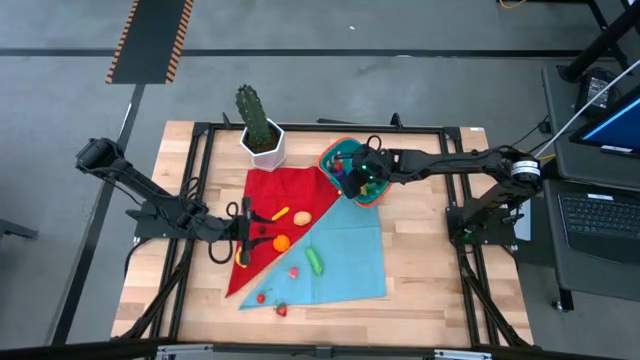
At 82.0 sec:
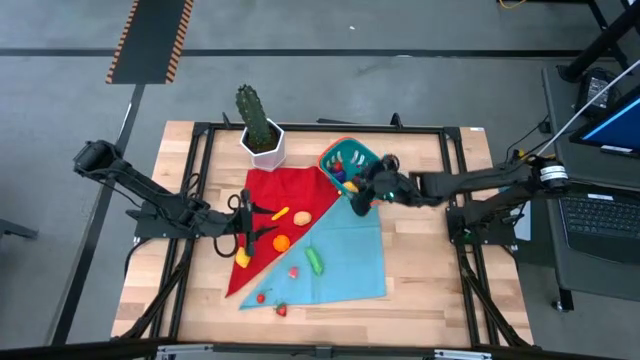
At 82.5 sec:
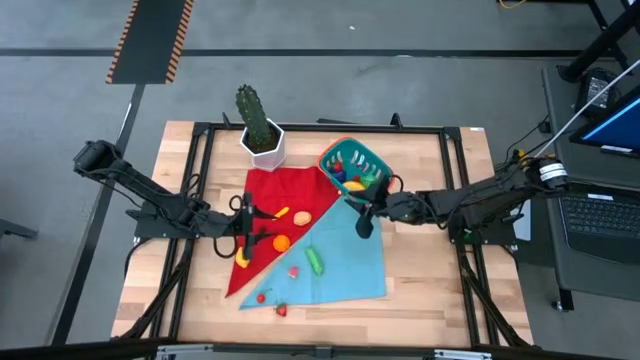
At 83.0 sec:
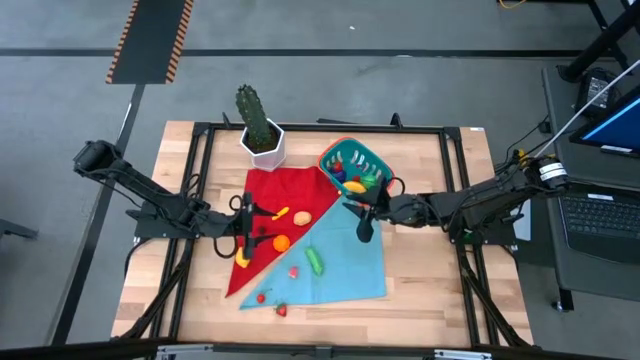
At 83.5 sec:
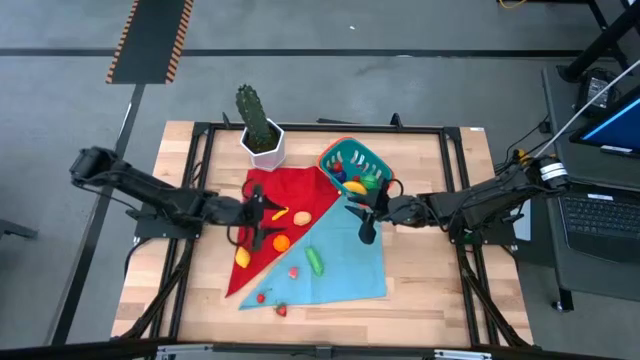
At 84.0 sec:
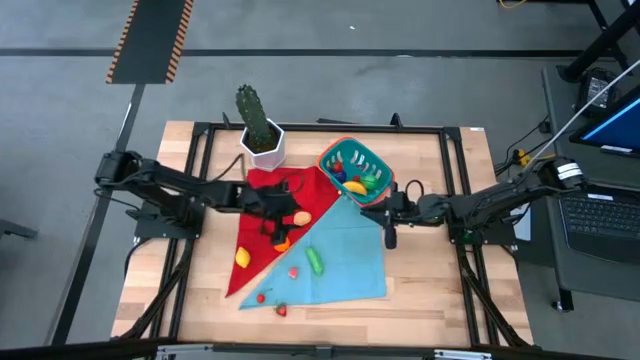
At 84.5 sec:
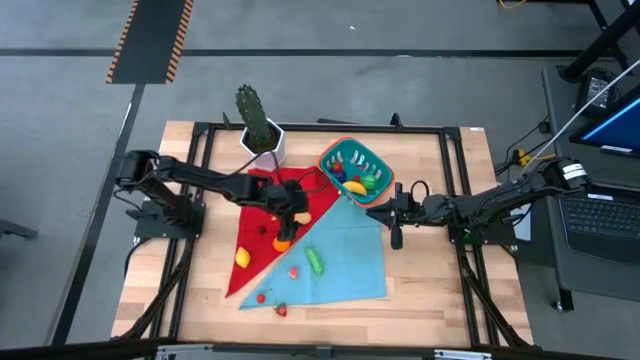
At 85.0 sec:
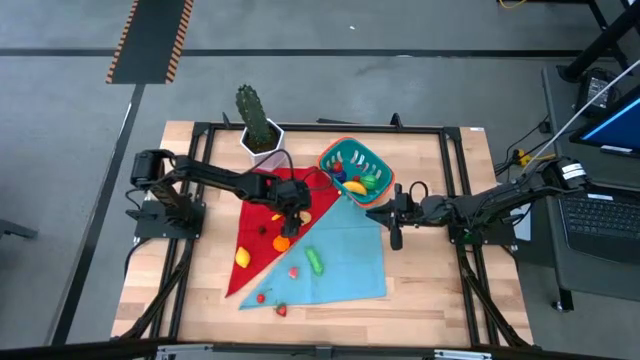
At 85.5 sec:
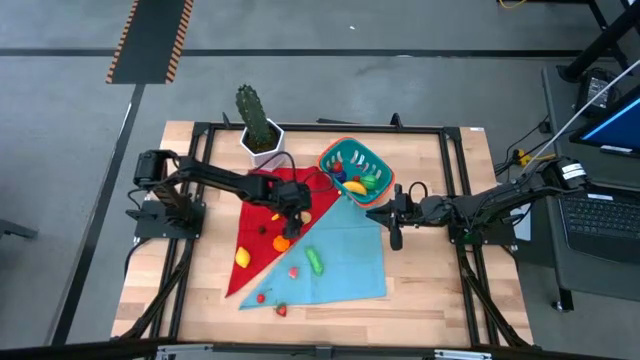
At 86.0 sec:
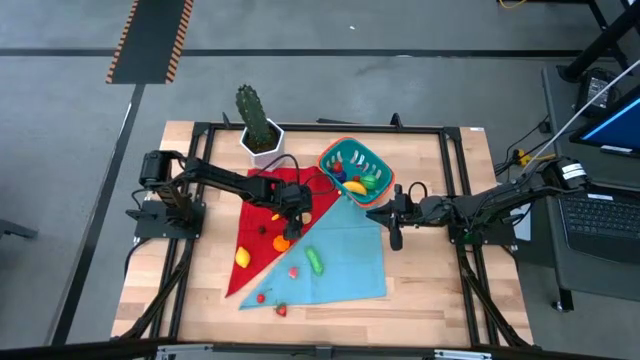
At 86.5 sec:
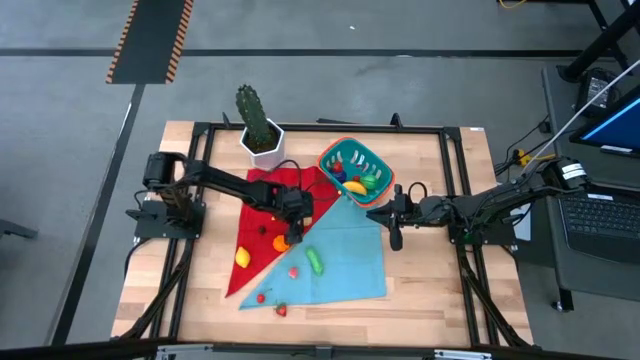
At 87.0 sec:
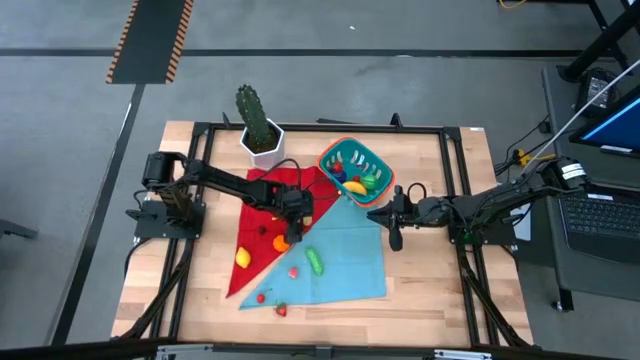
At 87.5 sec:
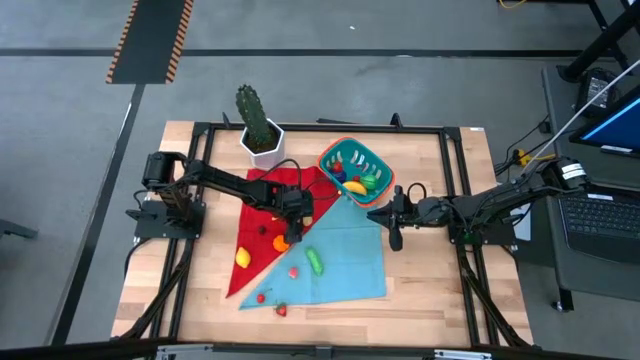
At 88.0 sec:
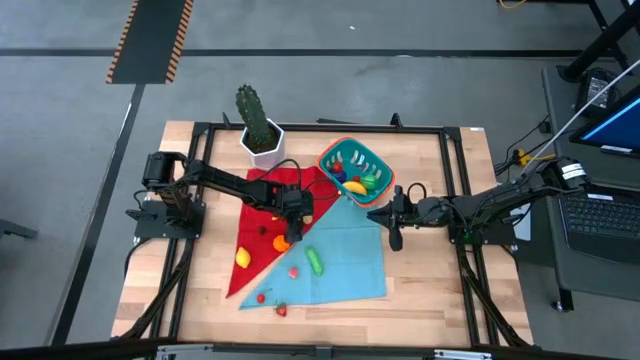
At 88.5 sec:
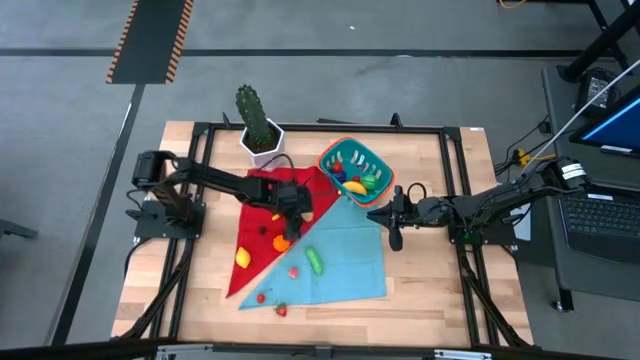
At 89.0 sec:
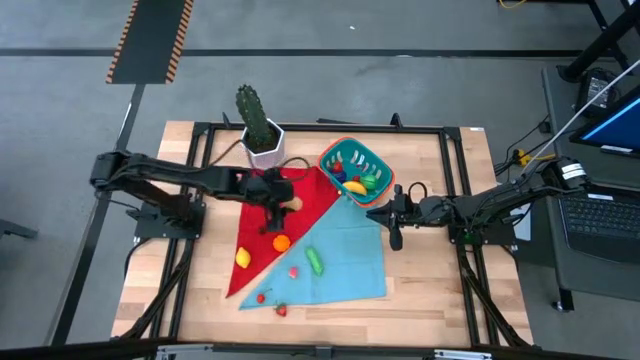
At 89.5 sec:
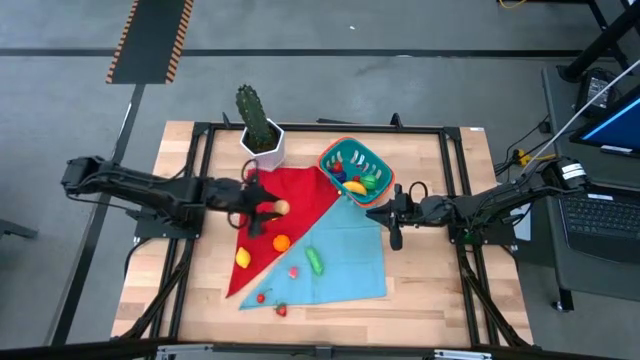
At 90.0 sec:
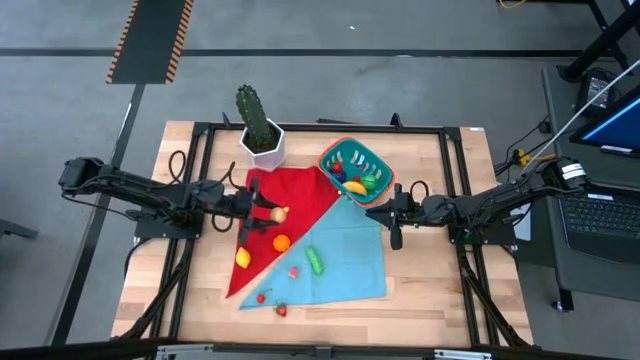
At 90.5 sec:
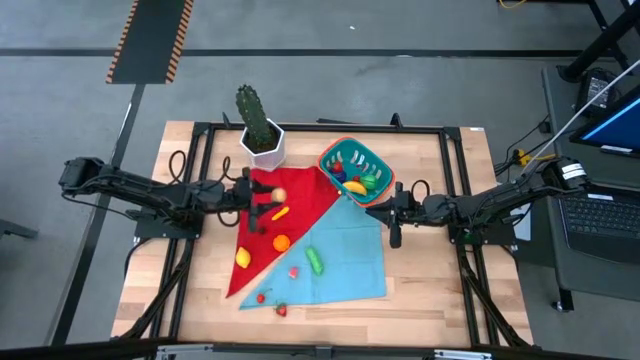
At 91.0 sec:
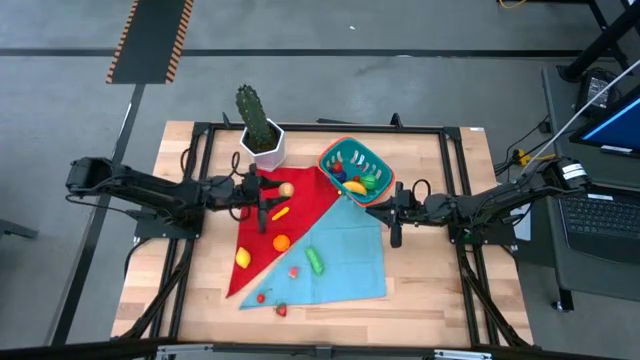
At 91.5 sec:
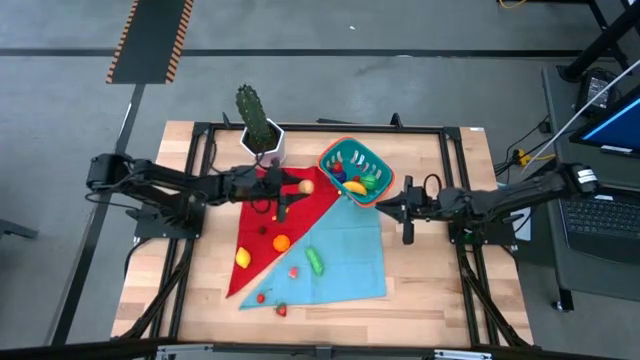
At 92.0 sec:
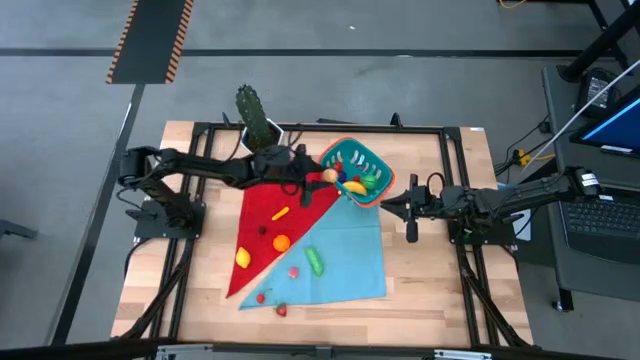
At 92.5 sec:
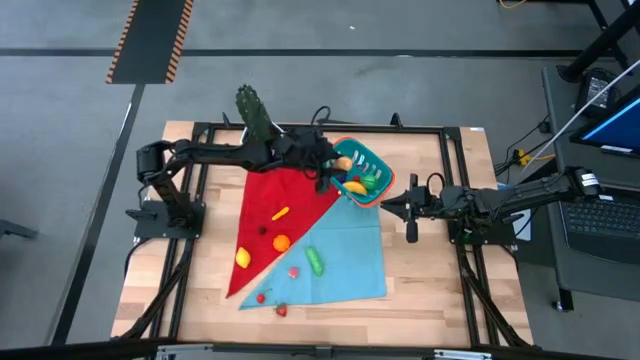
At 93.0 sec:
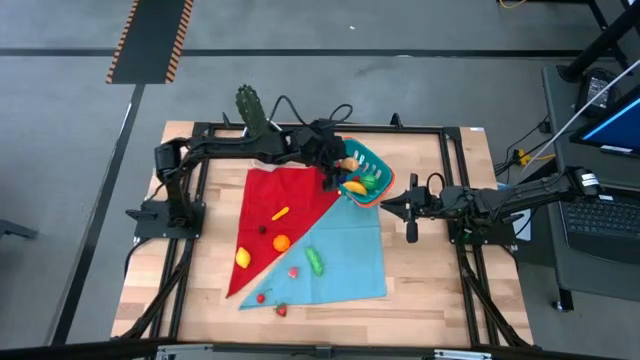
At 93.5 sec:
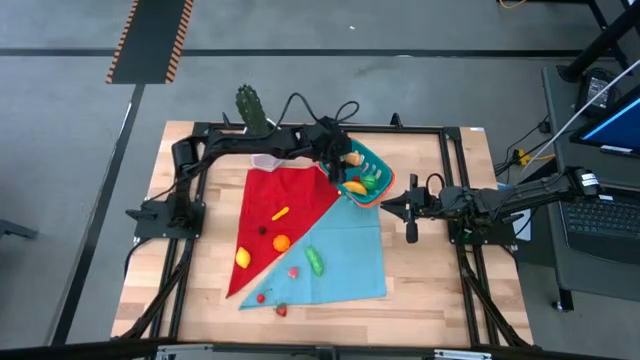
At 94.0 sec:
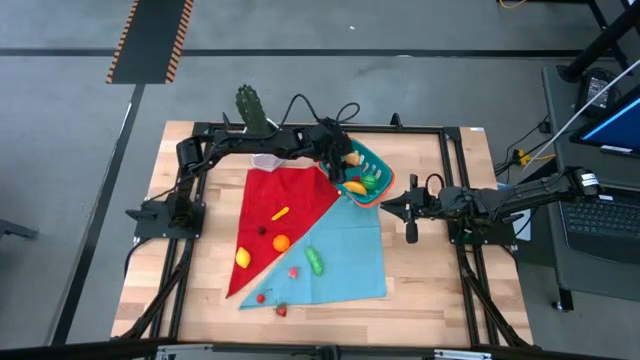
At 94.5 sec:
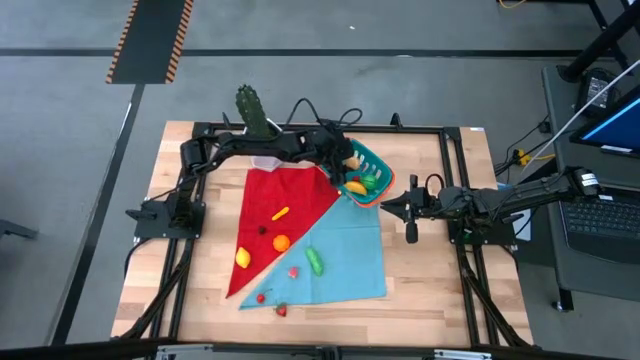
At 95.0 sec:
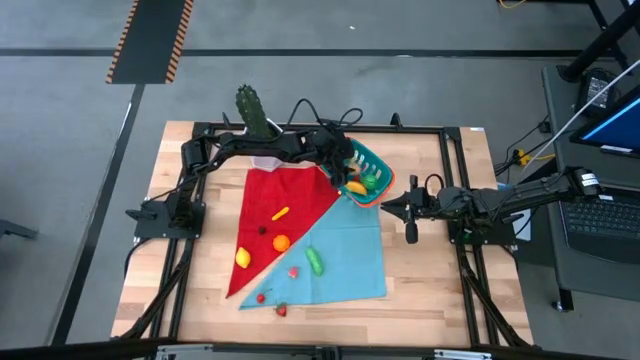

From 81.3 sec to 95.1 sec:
Task: Build produce basket
Put the brown potato into the blue basket

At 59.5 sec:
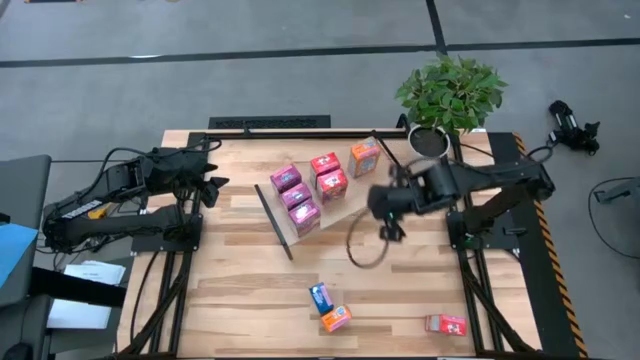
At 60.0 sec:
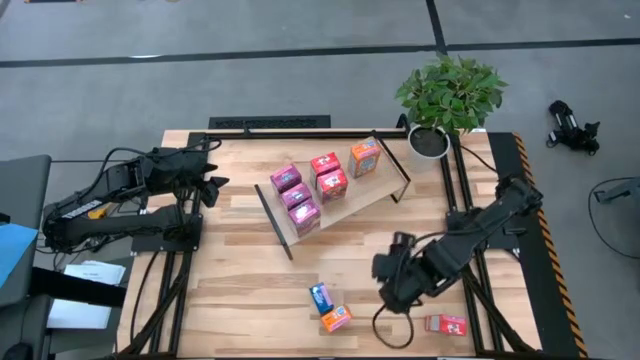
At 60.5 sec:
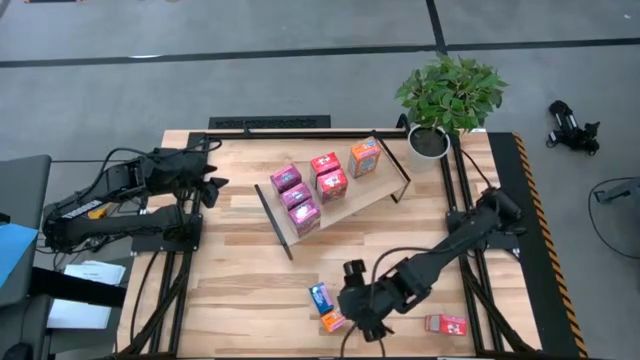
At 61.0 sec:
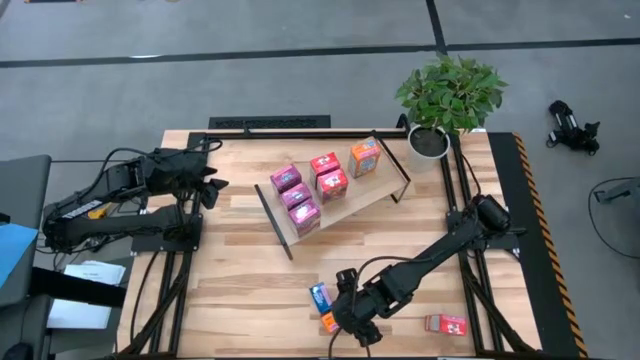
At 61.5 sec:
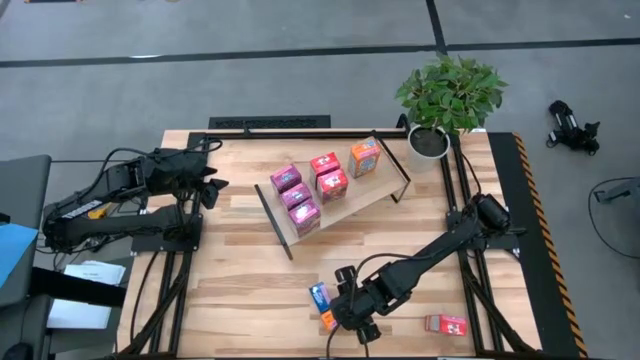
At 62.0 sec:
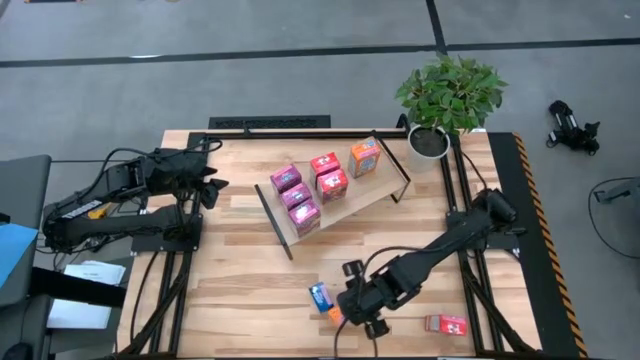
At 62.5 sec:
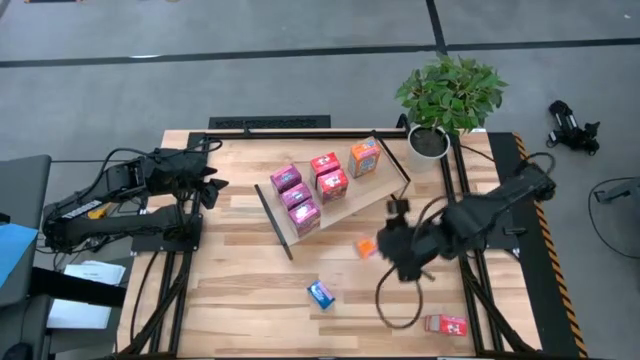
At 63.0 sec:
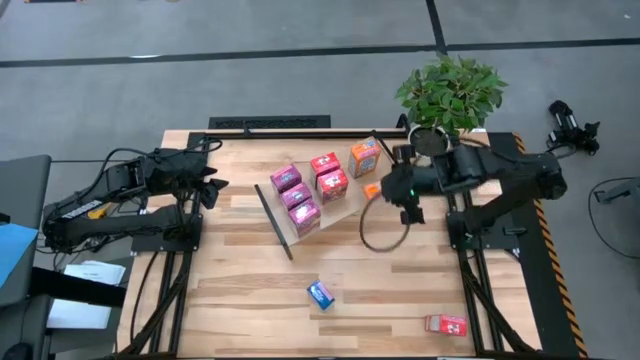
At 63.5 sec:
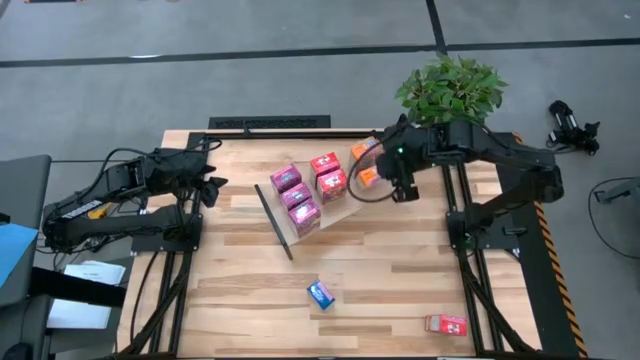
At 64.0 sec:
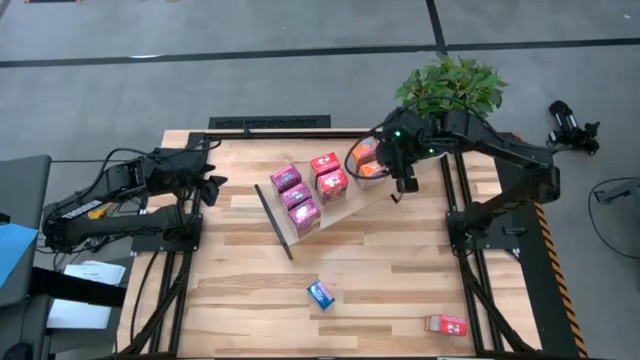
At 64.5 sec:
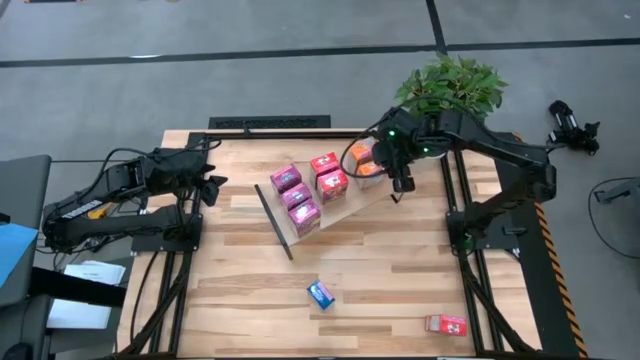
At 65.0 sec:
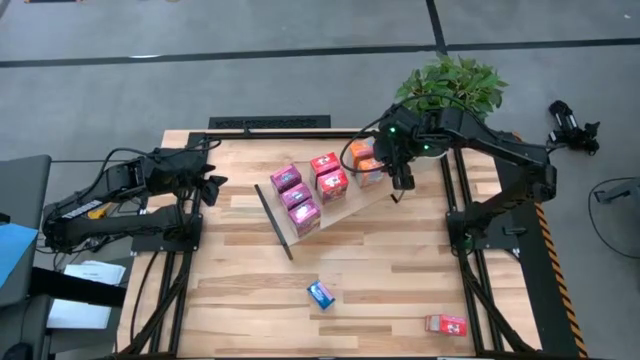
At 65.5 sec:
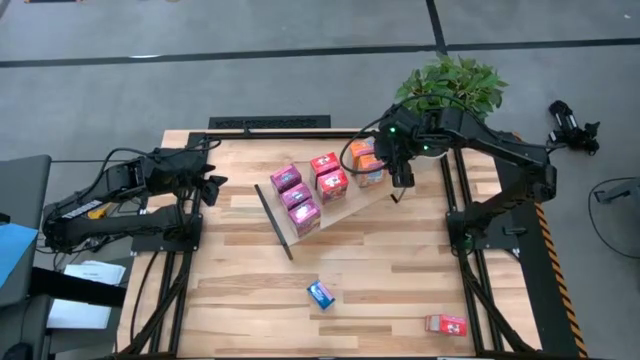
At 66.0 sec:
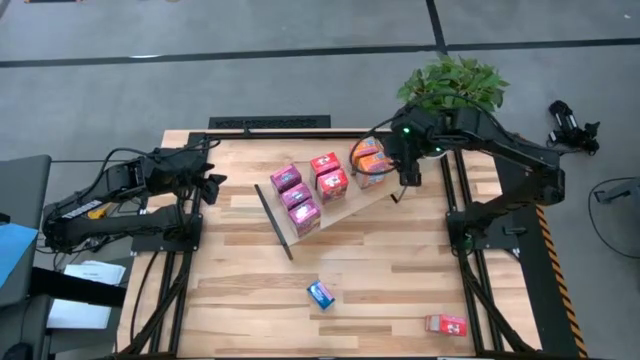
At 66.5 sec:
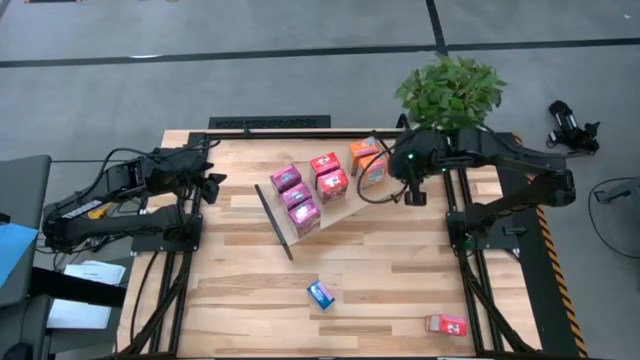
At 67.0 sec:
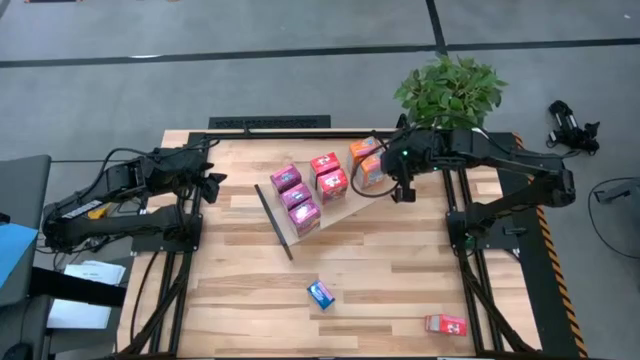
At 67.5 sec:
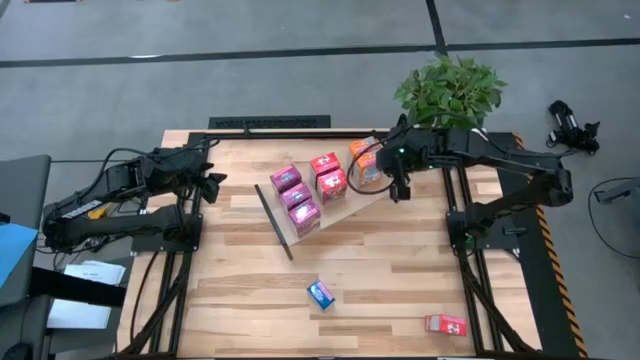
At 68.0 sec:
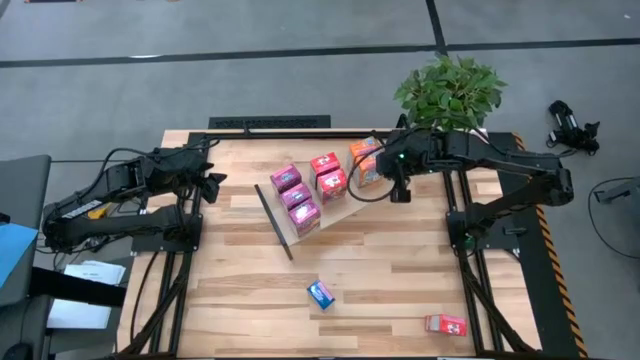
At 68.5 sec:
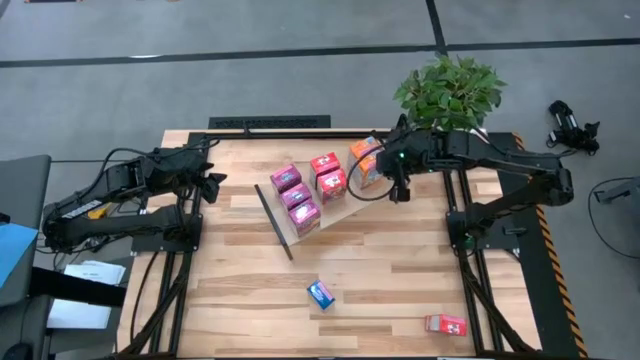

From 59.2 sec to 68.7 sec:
Task: Stack cereal on shelf
Put the orange cereal box aligned with the other orange cereal box on the shelf
